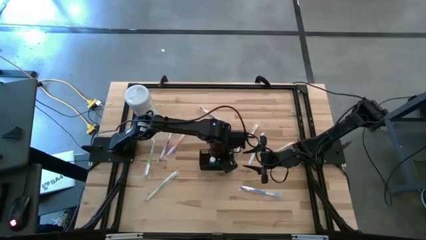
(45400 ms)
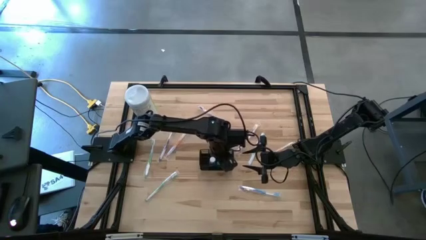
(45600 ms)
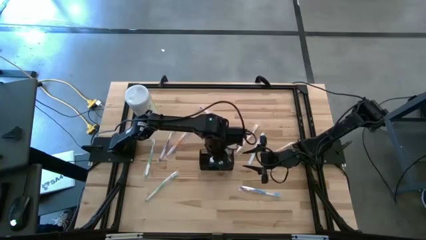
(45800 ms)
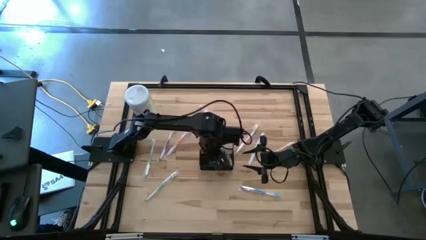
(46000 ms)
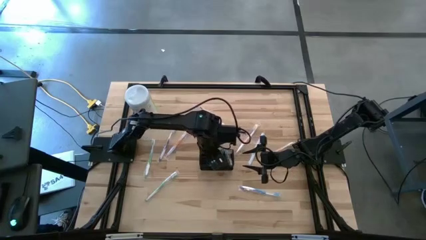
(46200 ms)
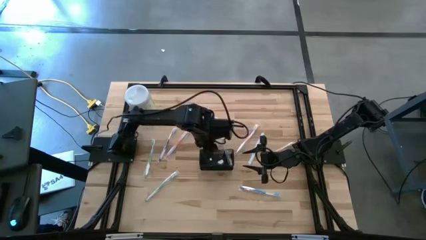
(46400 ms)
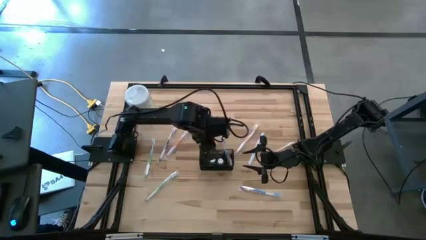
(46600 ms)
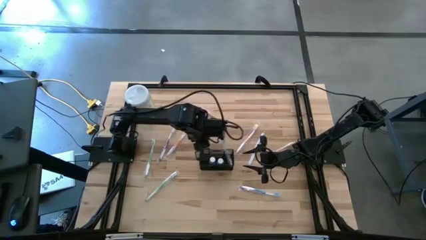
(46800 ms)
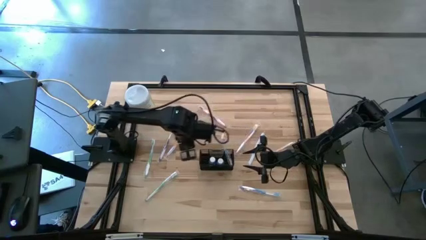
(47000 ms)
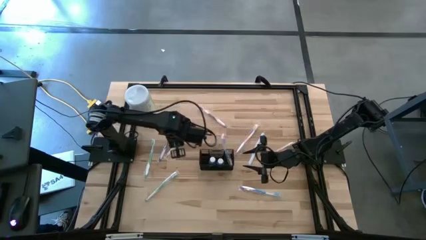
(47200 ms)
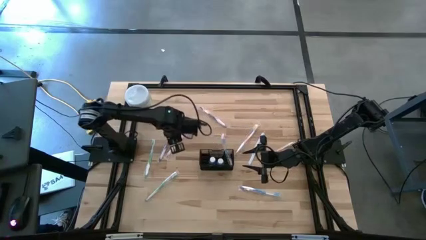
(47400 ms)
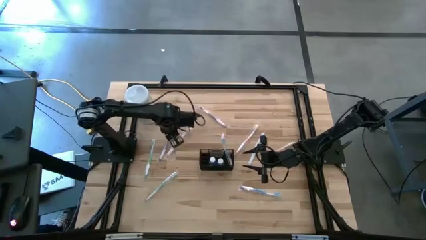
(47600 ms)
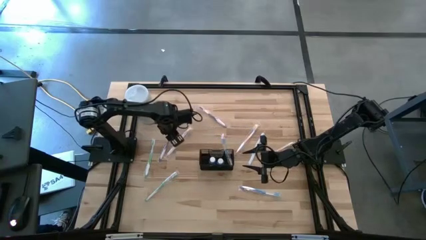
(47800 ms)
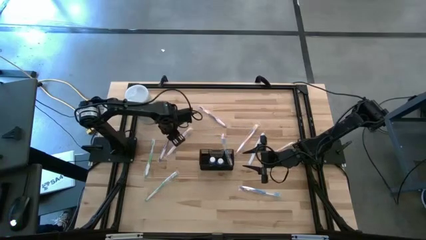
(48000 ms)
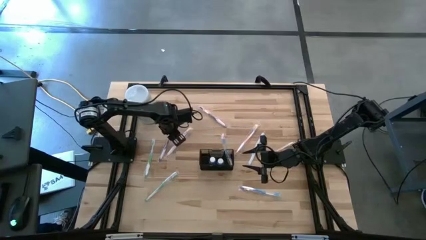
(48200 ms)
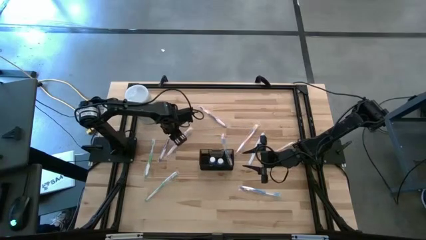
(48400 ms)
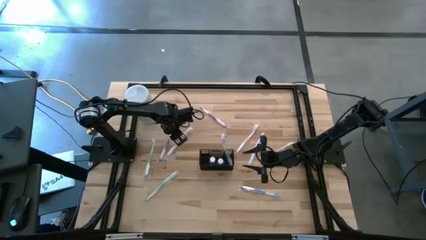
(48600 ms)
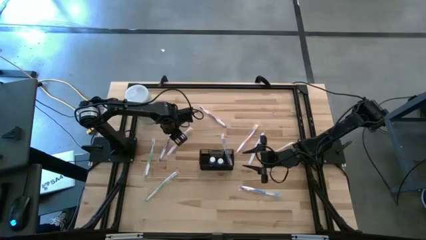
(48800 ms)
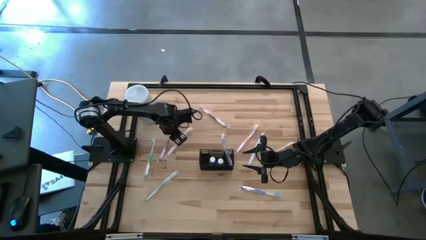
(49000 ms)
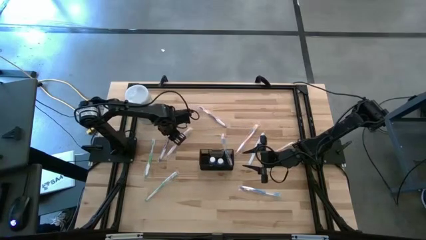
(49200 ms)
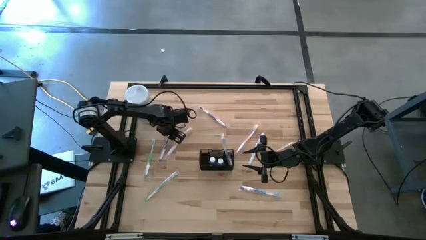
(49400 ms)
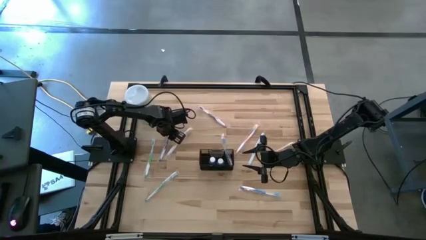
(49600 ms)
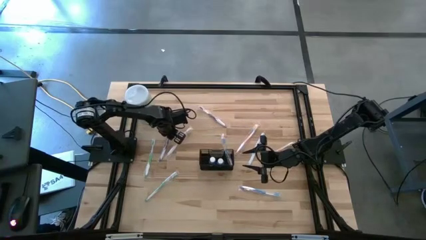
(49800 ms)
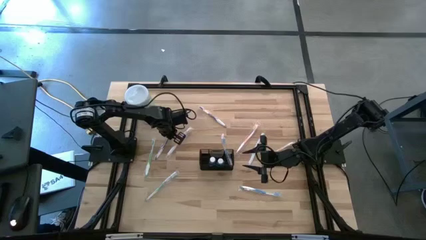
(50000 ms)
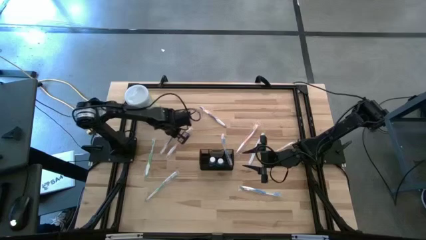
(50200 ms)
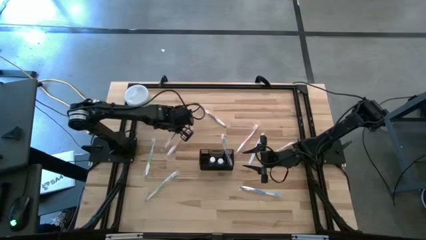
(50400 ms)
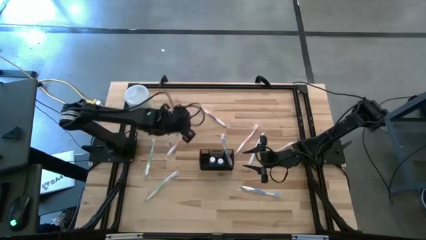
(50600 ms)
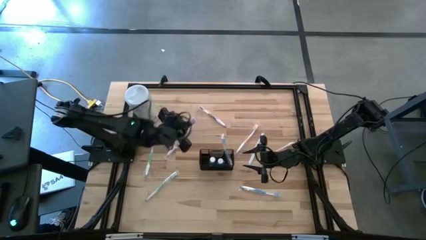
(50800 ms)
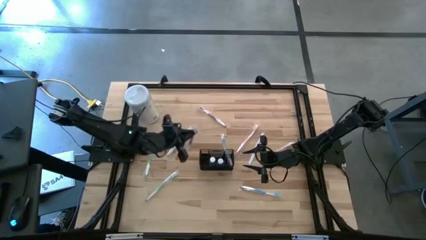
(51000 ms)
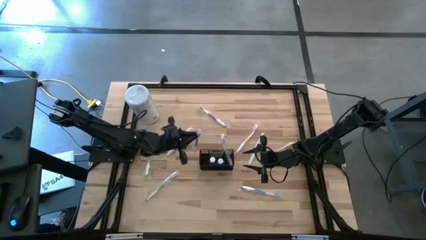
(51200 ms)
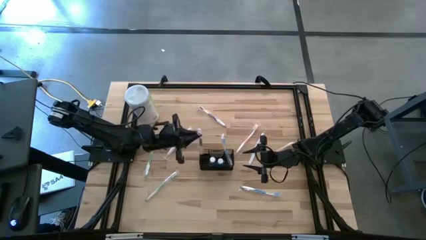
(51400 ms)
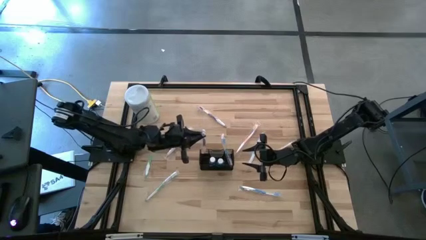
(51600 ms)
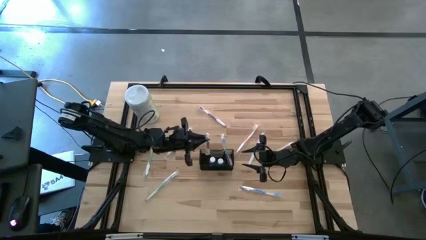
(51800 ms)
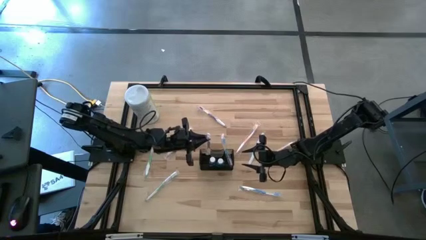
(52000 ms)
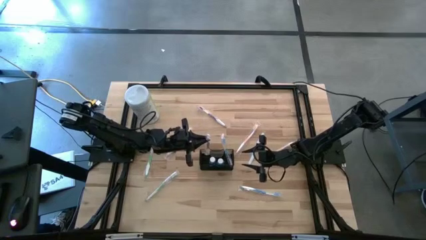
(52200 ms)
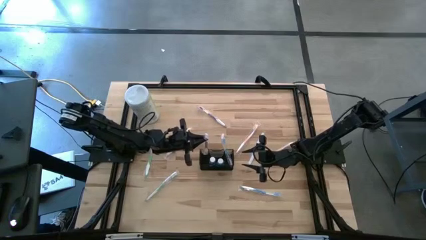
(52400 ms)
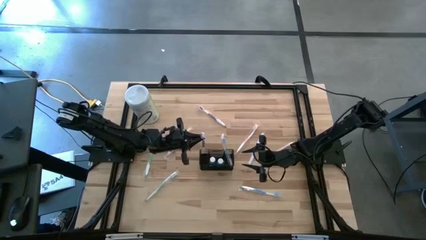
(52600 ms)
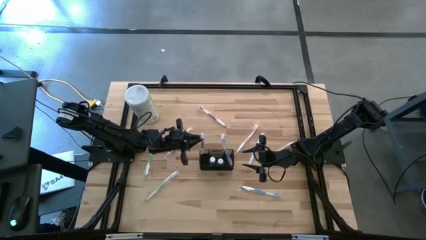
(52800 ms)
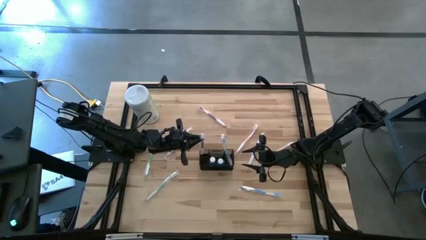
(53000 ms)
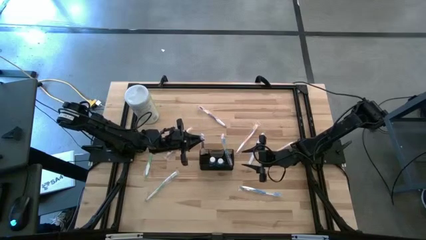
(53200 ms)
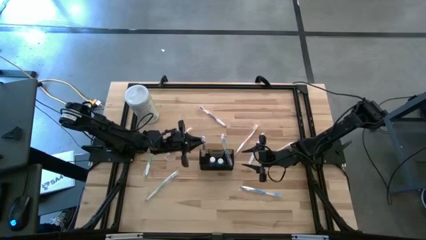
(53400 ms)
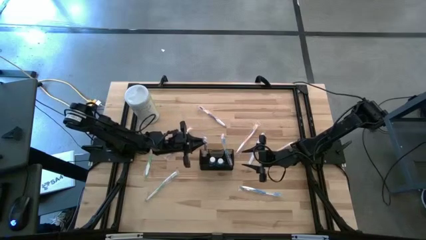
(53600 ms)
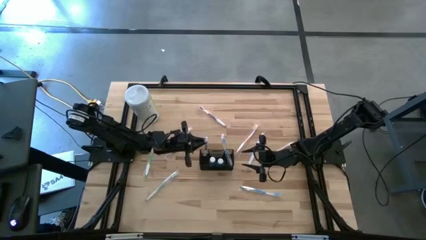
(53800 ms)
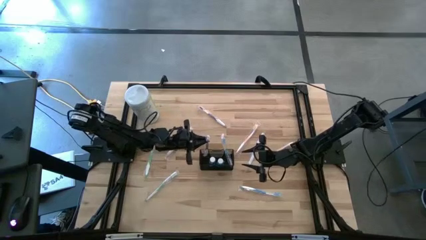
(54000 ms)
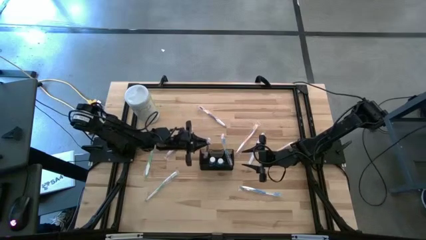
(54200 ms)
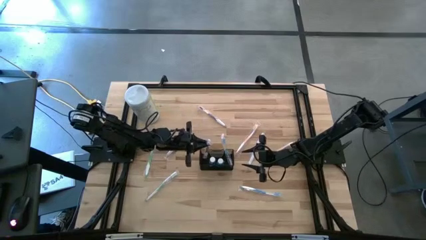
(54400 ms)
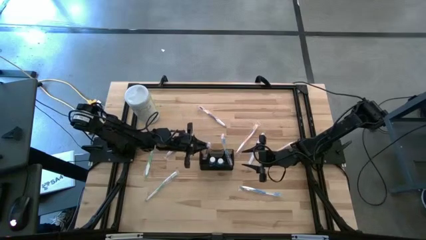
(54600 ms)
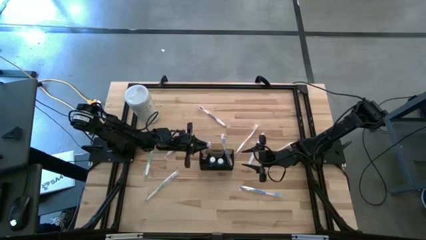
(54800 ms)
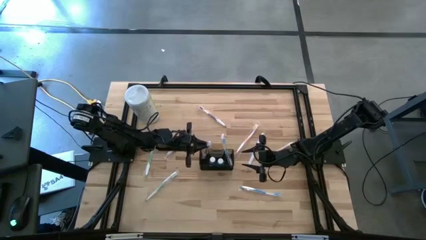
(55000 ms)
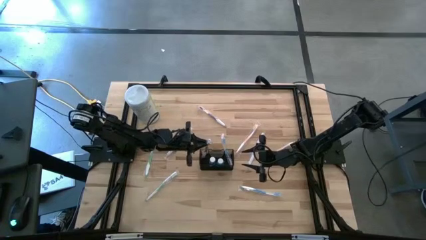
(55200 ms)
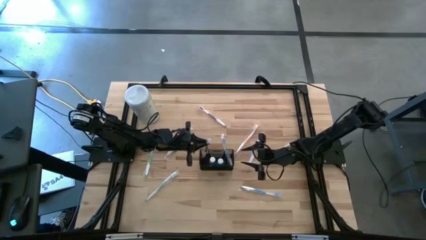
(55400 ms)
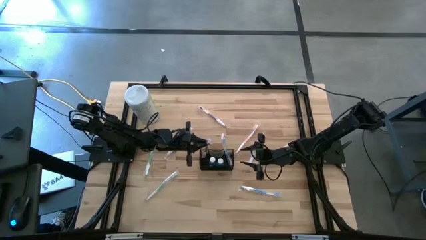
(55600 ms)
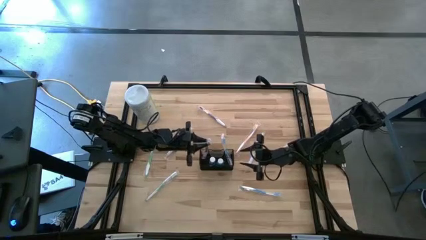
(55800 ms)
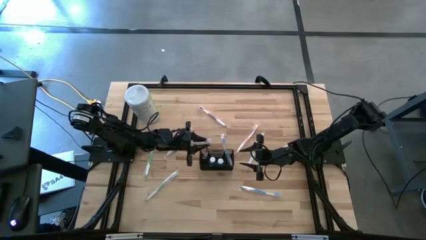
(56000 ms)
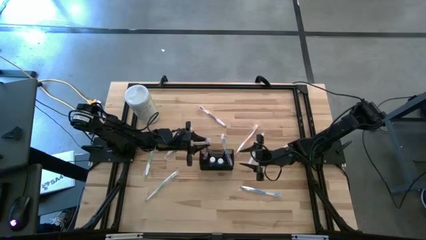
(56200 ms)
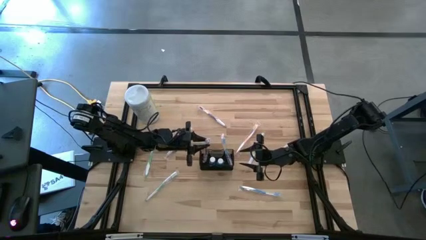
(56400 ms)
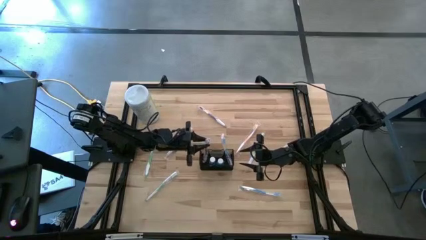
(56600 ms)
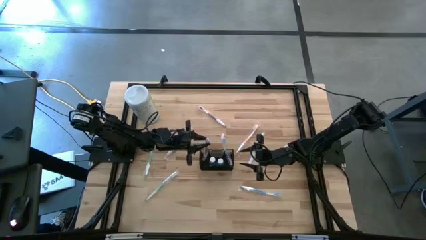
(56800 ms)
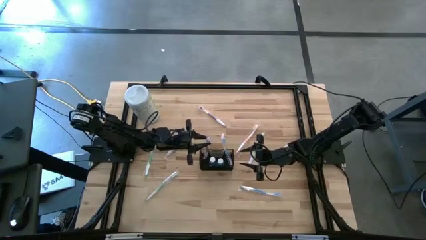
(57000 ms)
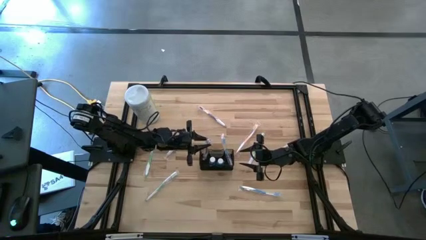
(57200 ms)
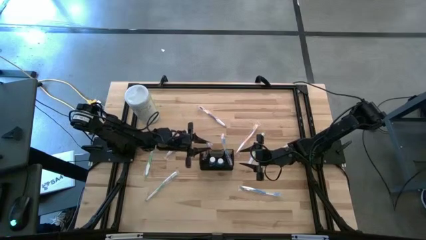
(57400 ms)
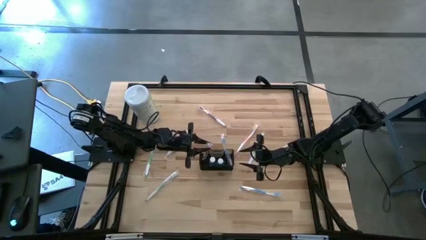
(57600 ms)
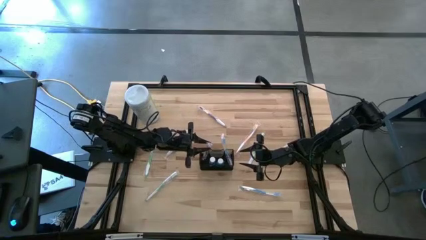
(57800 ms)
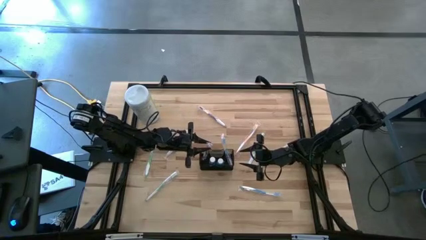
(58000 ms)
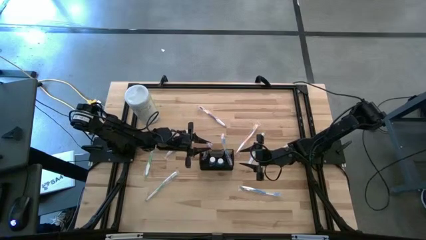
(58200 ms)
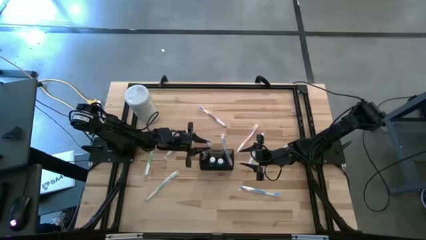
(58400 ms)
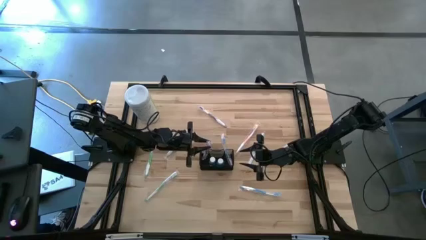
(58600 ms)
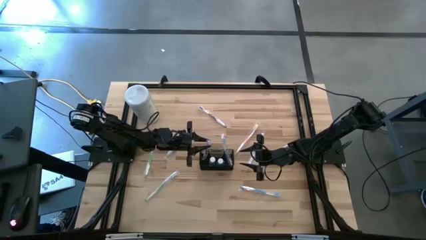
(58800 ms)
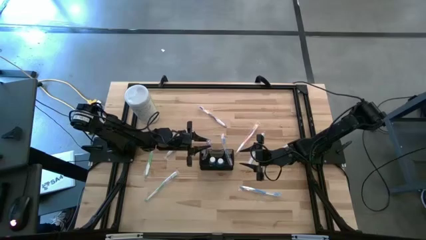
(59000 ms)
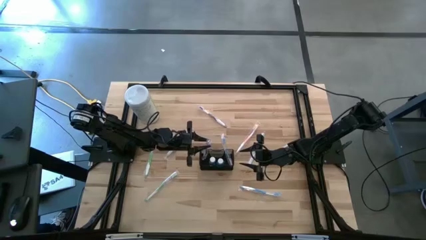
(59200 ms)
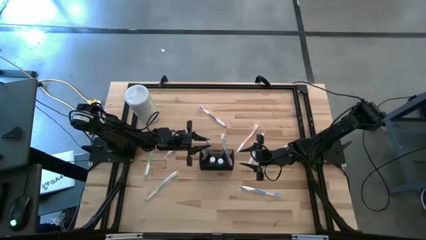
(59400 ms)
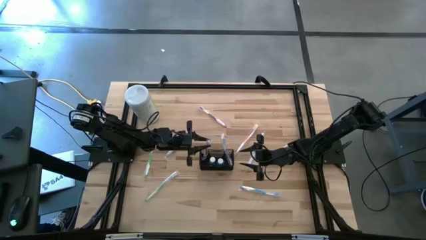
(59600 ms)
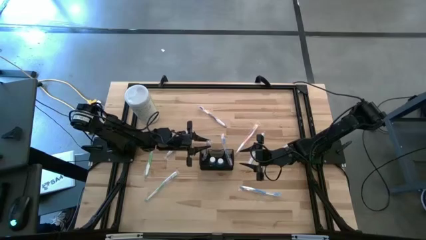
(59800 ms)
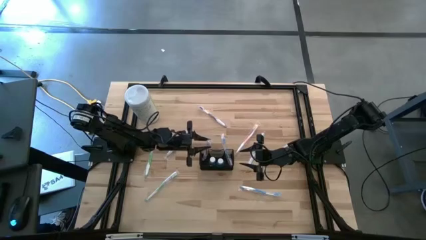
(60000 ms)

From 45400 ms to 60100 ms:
Task: Pick & Place toothbrushing station
Put the left violet toothbrush into the black wire organizer

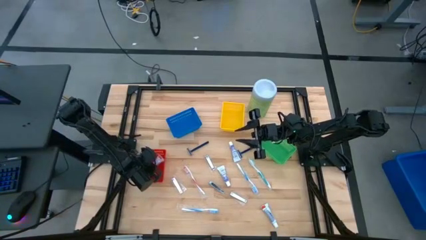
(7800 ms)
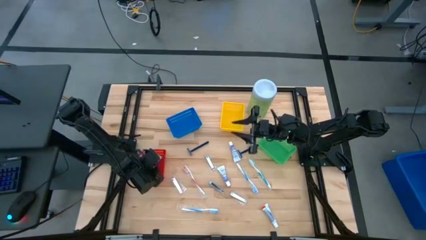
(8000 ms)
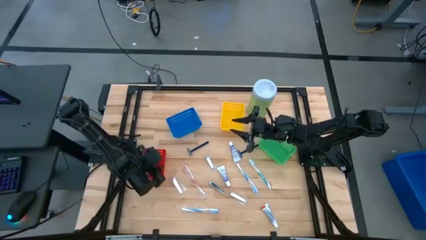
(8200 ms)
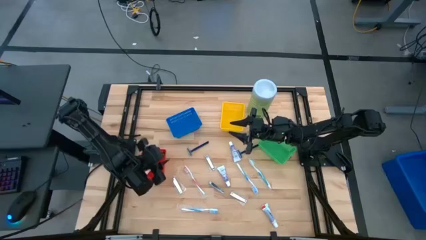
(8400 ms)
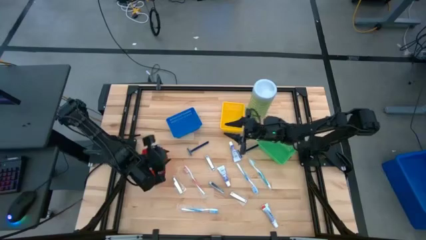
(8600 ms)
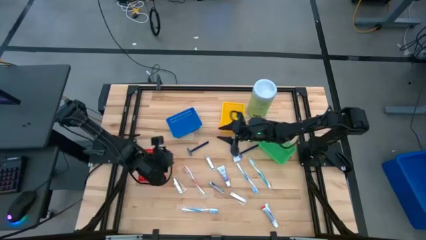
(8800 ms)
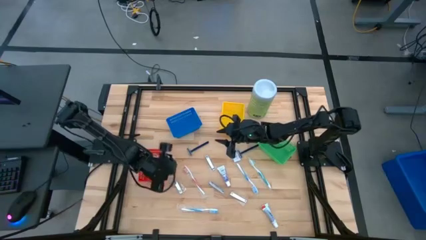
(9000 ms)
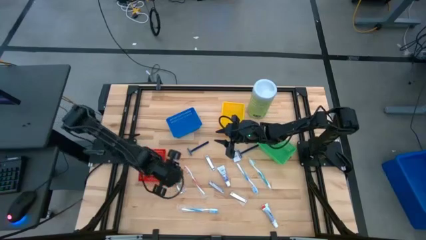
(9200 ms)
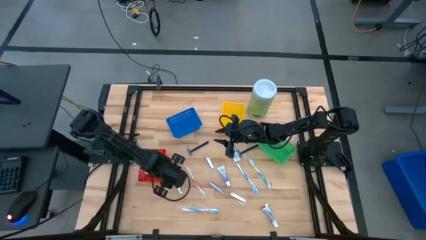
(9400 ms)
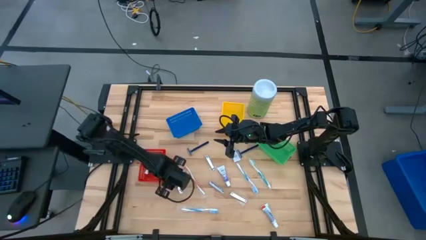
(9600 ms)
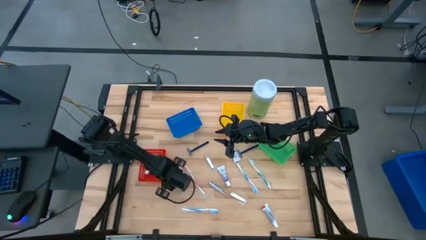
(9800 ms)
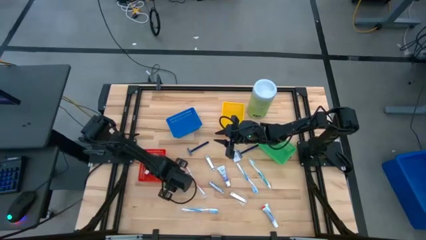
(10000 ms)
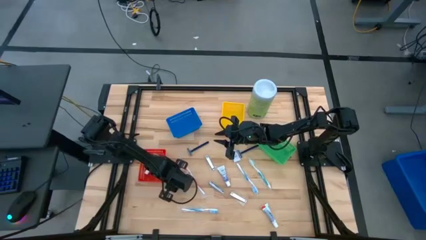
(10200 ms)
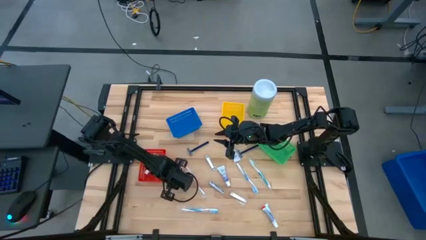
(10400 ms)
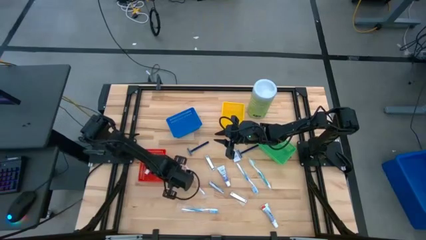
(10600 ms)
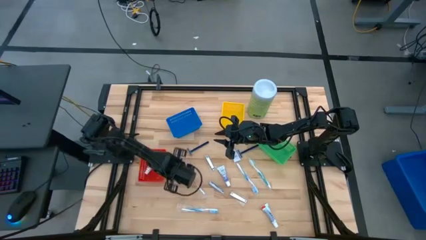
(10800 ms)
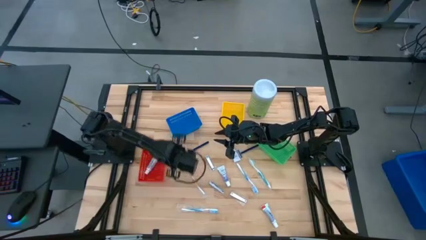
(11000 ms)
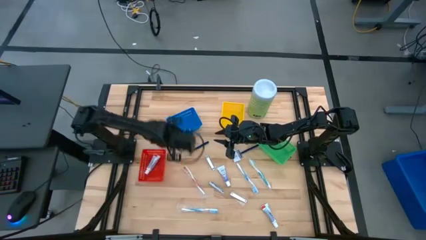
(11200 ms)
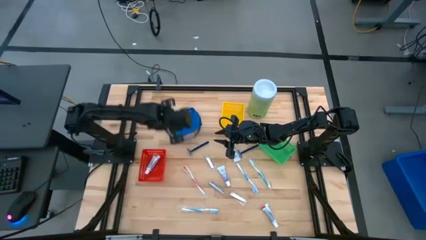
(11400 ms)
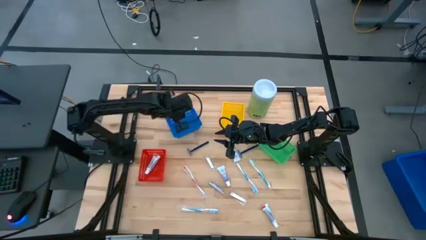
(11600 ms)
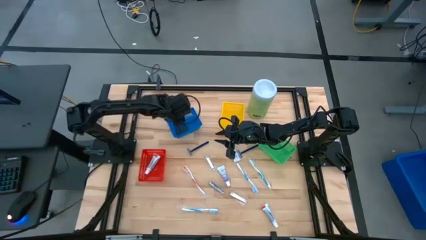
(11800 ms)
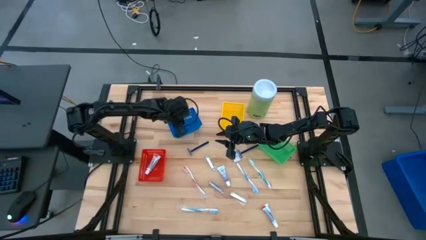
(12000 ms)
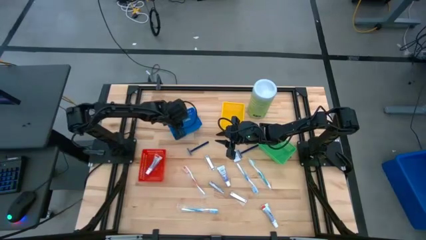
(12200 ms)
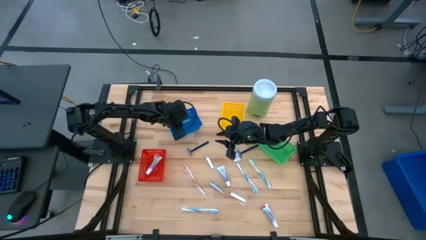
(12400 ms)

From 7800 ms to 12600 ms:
Task: Pick & Place Travel size toiletries
Put the silver nail cutter into the blue basket
